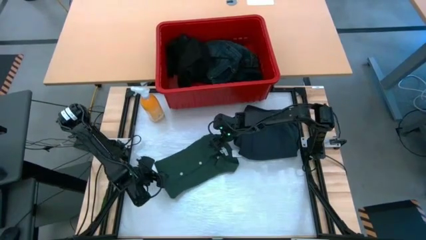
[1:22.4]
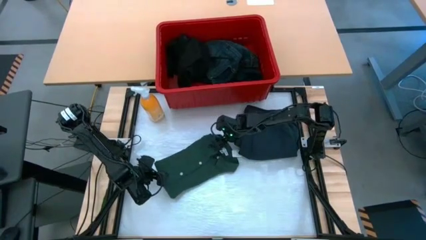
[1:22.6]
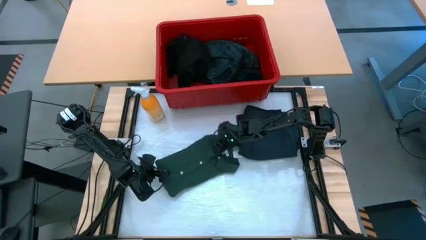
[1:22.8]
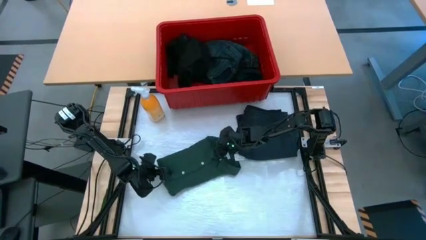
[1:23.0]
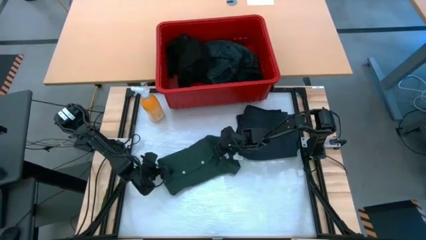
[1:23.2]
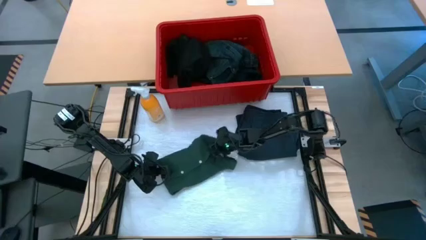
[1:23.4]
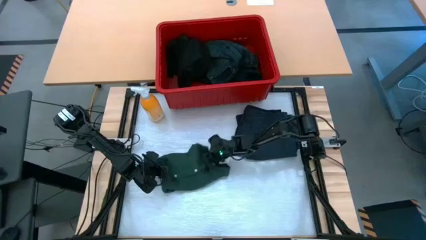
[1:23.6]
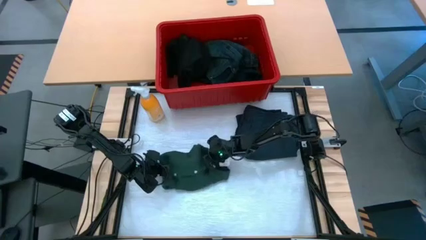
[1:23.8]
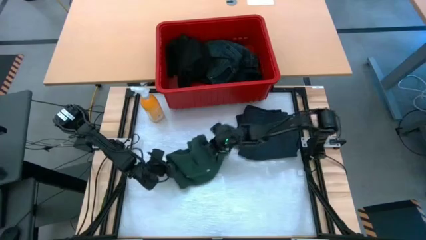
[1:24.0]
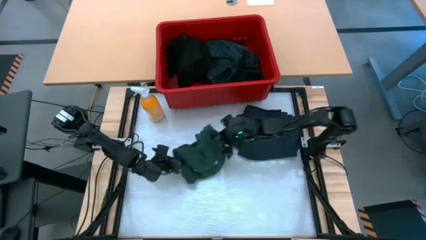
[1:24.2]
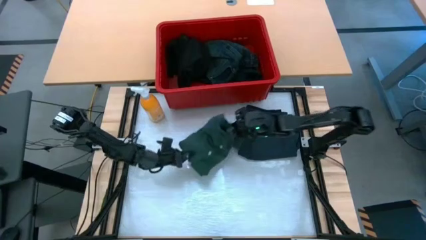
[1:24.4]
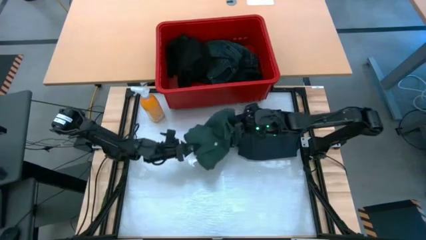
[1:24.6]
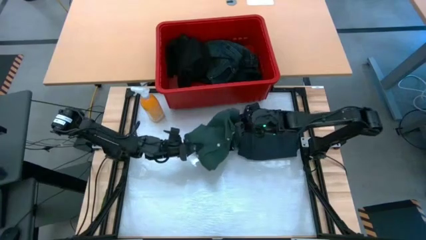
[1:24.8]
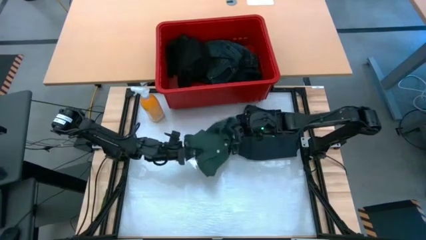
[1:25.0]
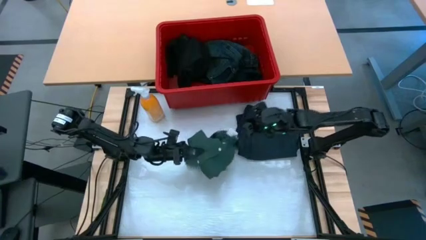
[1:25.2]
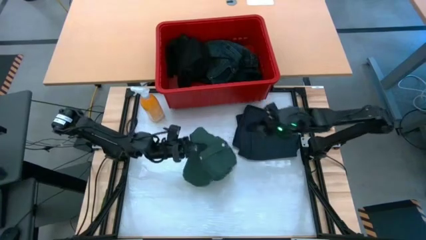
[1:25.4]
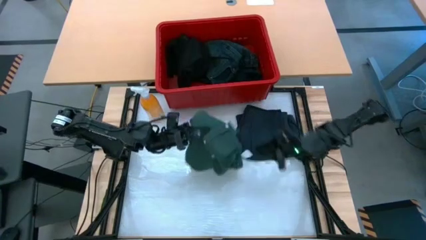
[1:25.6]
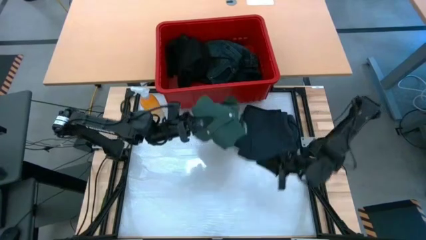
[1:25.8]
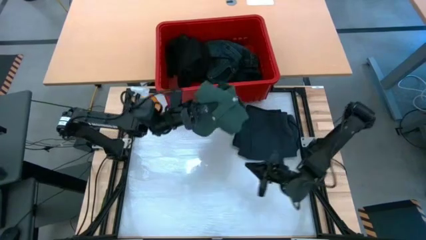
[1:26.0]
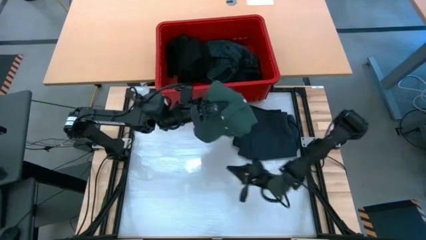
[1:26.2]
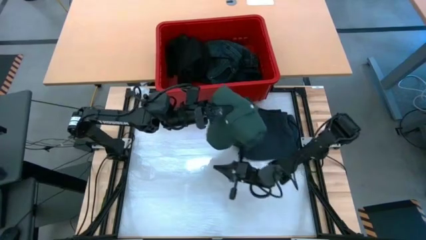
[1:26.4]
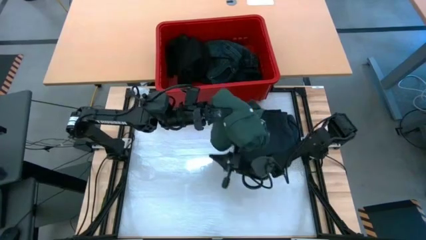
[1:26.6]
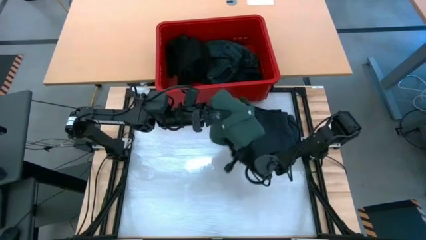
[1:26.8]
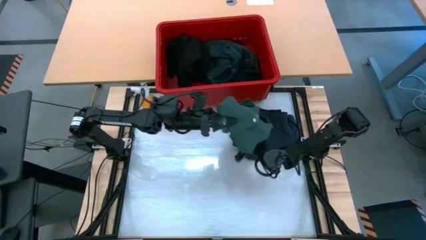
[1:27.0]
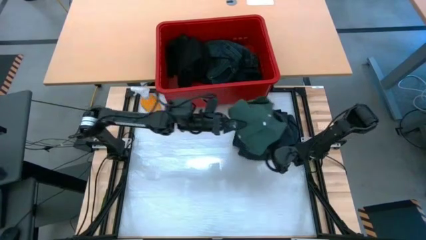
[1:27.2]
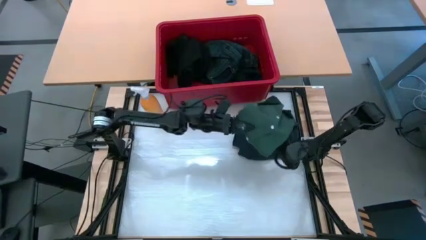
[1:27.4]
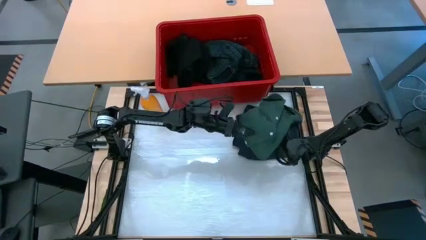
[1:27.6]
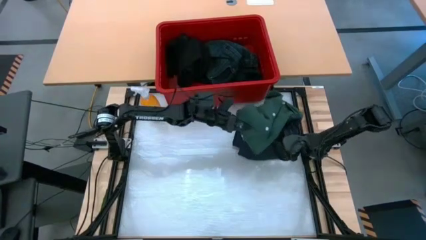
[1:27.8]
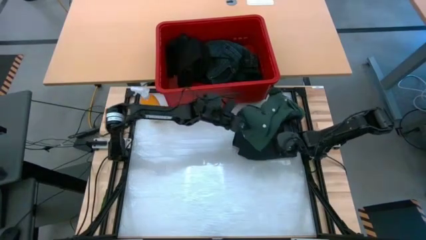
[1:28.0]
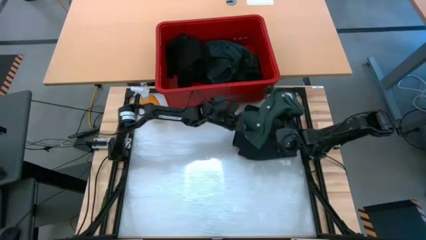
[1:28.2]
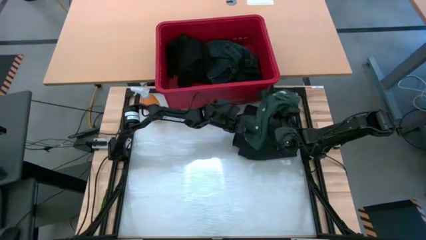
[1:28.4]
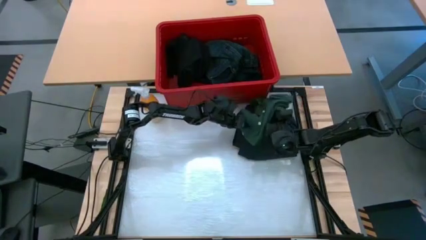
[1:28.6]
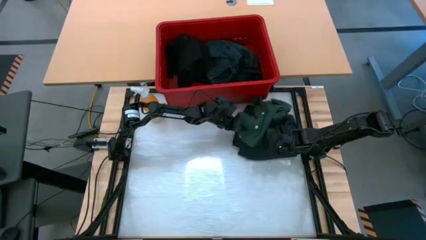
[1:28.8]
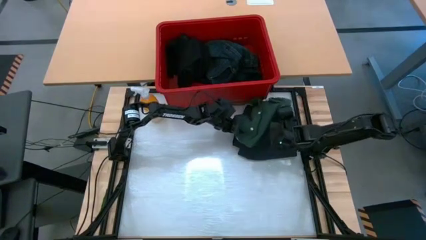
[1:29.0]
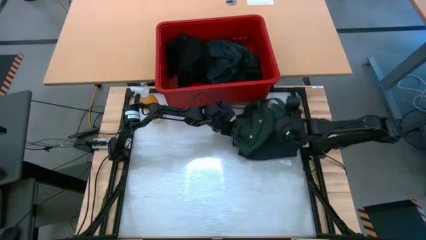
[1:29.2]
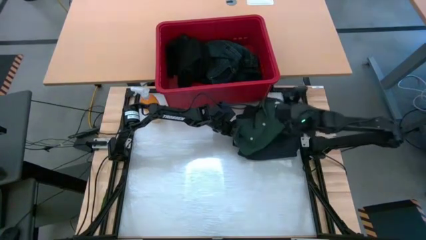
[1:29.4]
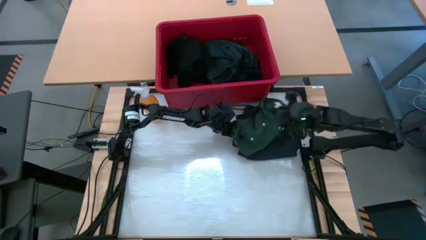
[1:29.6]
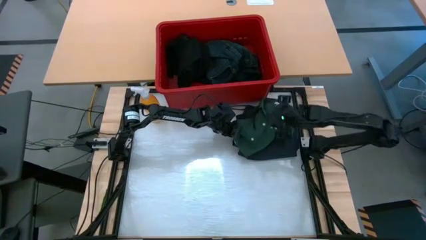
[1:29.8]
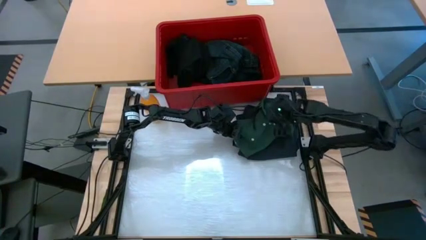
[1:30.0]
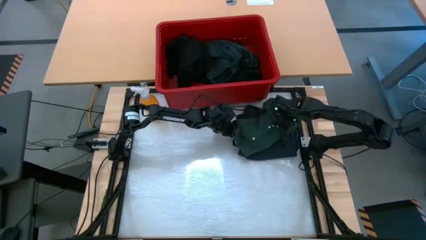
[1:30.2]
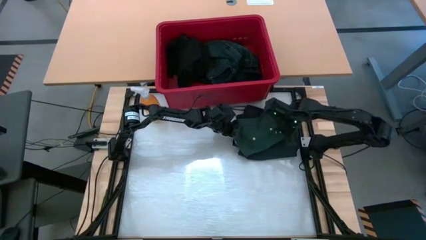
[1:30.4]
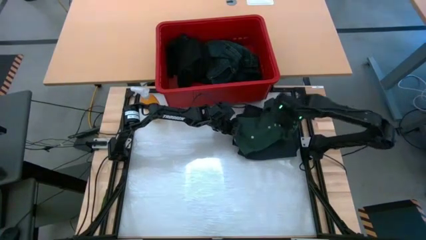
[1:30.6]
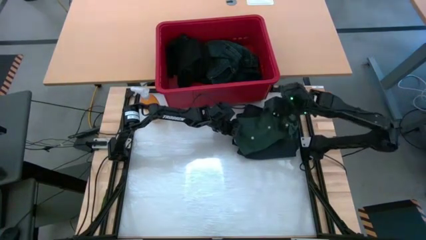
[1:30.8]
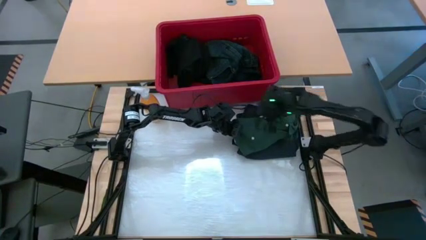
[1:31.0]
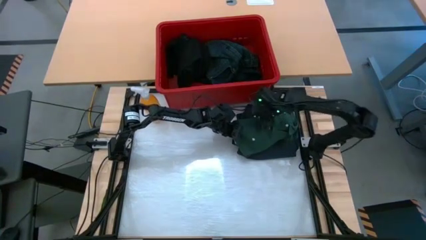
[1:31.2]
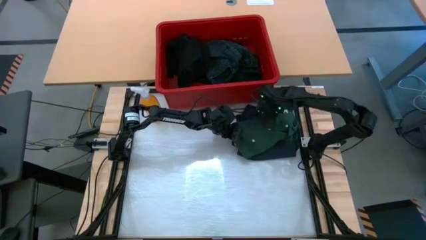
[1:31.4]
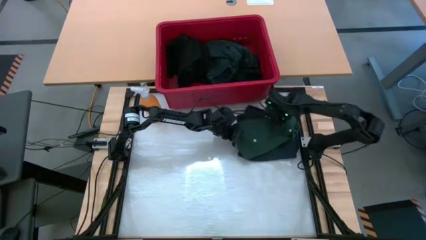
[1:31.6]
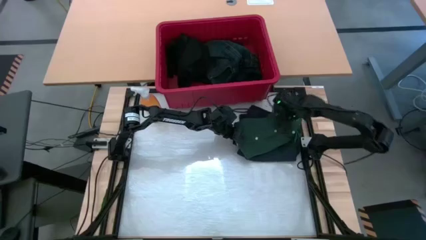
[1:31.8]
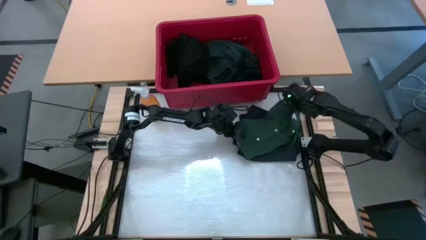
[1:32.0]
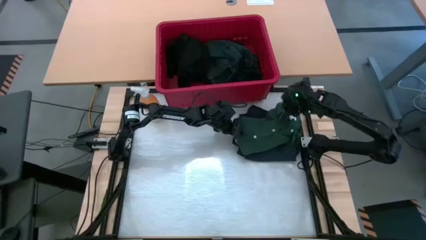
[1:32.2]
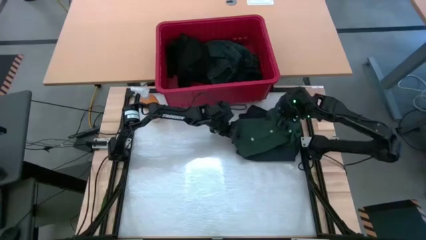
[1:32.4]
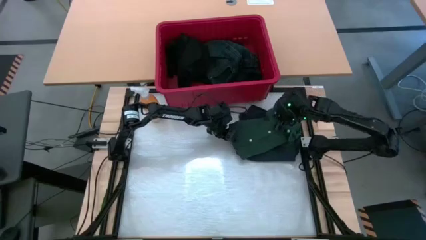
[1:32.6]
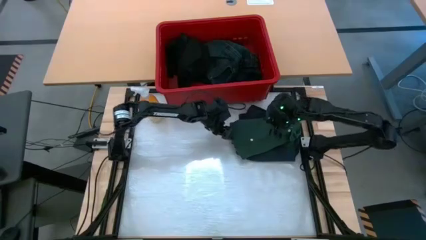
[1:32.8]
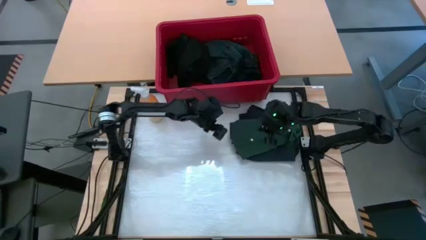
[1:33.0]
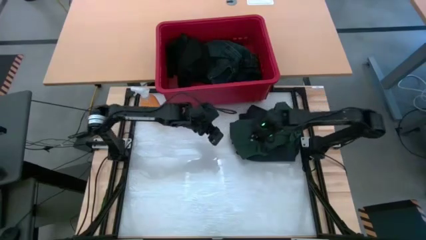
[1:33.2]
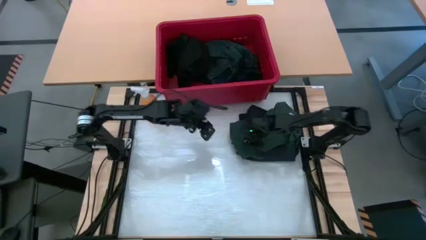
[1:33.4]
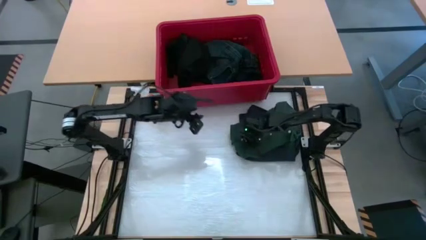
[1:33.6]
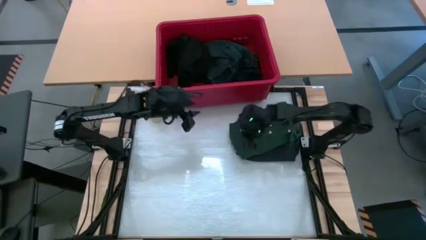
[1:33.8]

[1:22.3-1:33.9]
Task: Fold Laundry from Bin
Stack the green polo shirt on top of the black short
